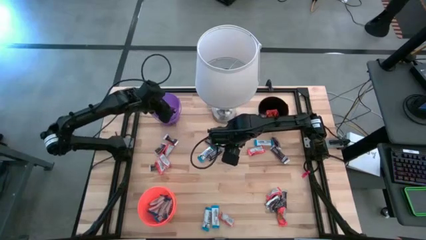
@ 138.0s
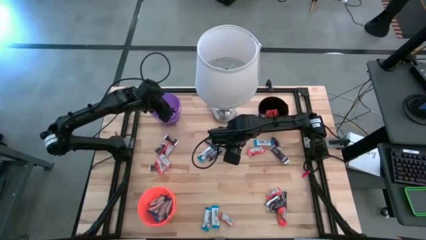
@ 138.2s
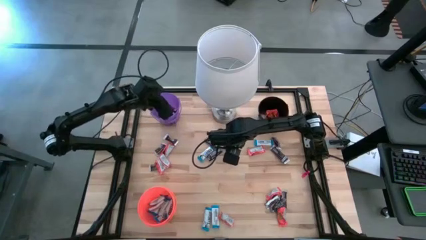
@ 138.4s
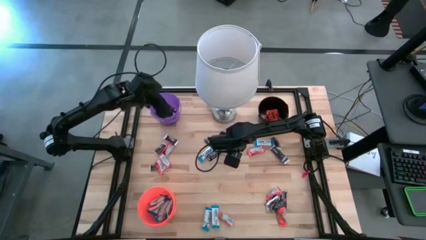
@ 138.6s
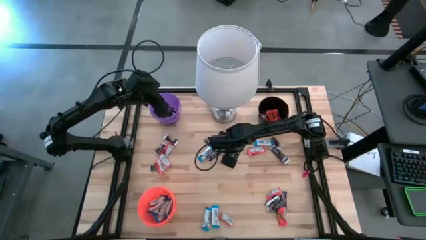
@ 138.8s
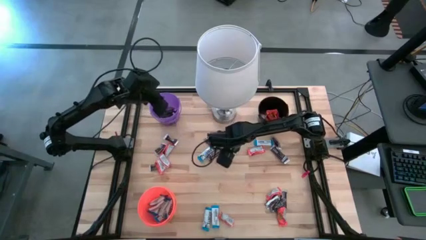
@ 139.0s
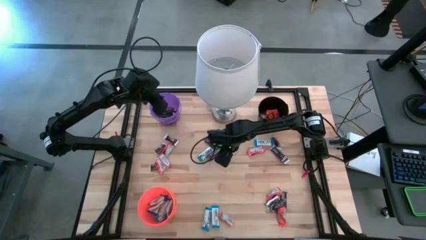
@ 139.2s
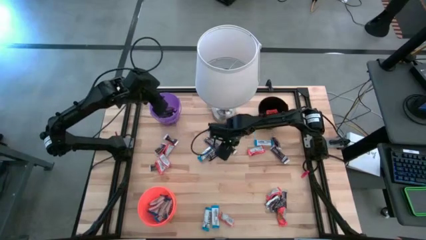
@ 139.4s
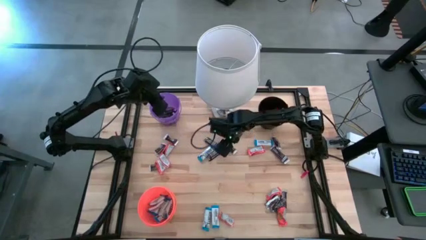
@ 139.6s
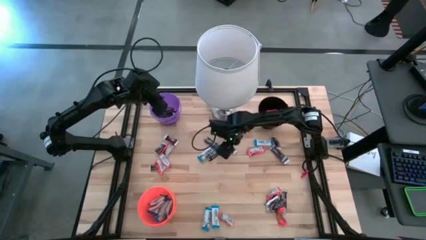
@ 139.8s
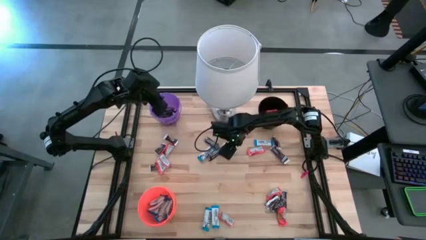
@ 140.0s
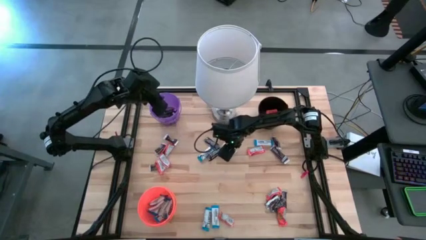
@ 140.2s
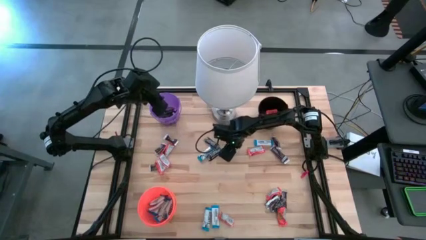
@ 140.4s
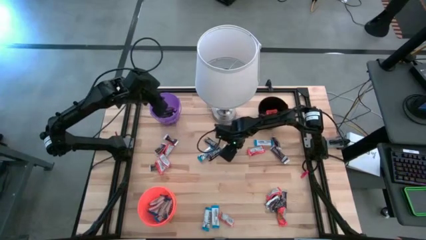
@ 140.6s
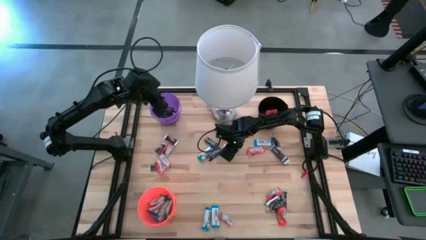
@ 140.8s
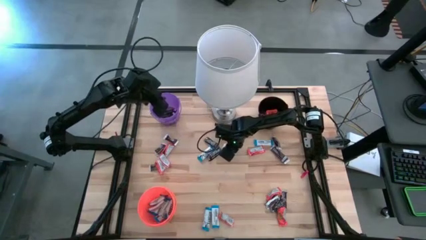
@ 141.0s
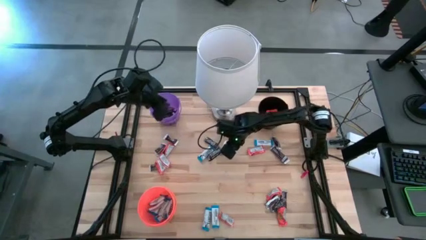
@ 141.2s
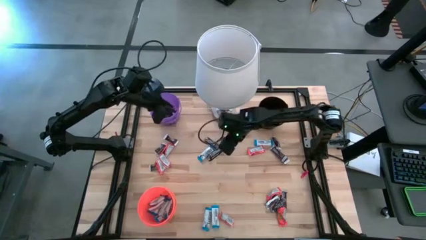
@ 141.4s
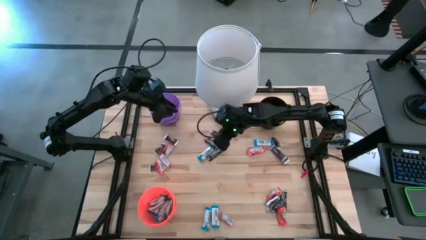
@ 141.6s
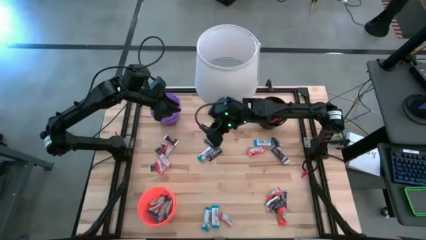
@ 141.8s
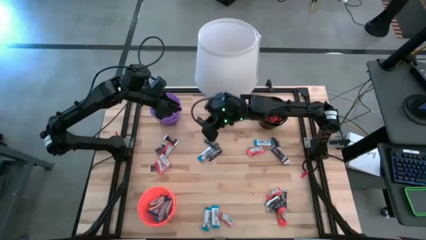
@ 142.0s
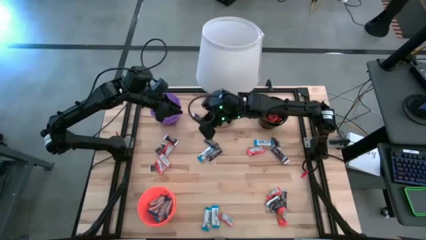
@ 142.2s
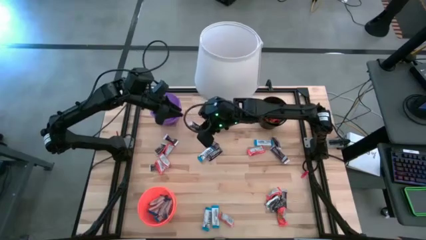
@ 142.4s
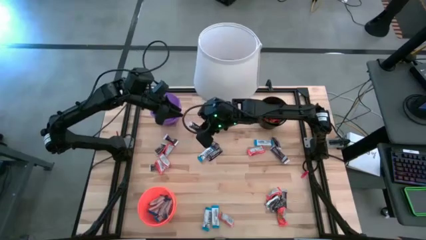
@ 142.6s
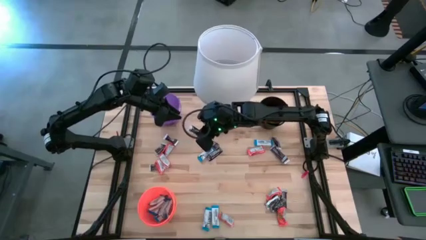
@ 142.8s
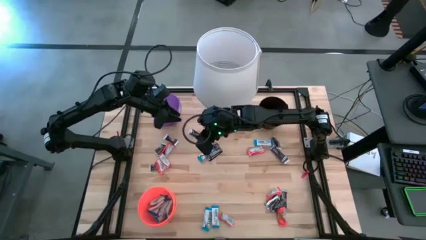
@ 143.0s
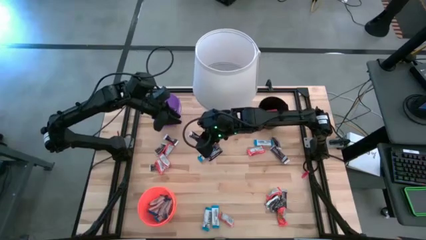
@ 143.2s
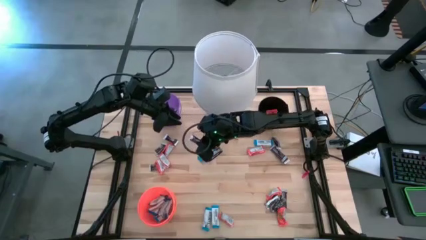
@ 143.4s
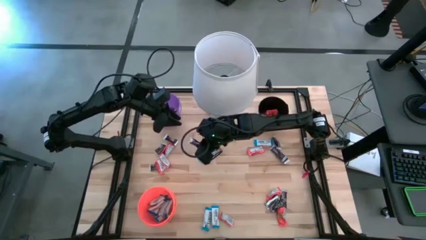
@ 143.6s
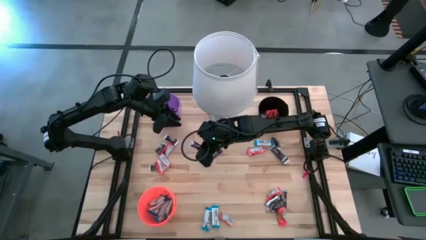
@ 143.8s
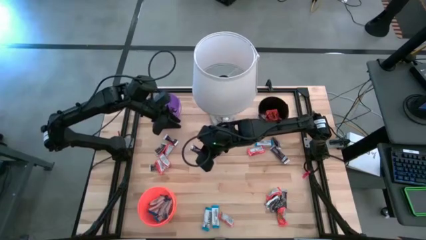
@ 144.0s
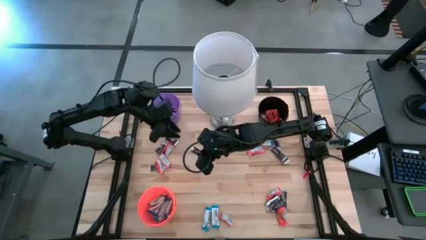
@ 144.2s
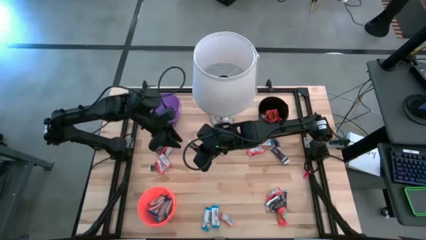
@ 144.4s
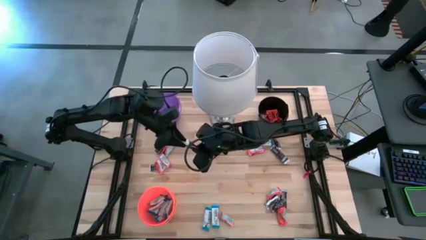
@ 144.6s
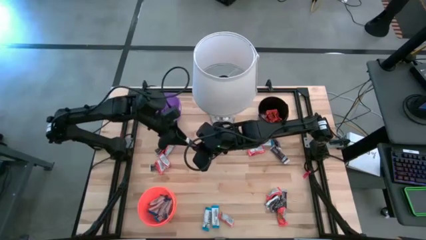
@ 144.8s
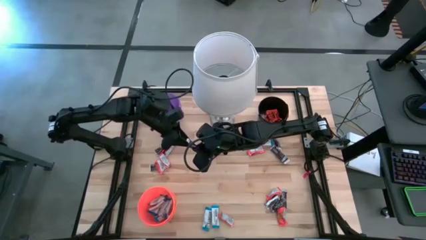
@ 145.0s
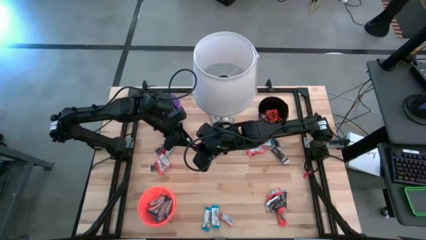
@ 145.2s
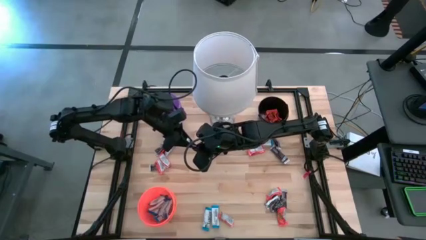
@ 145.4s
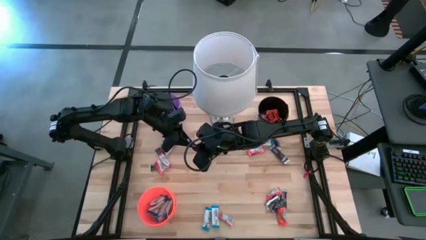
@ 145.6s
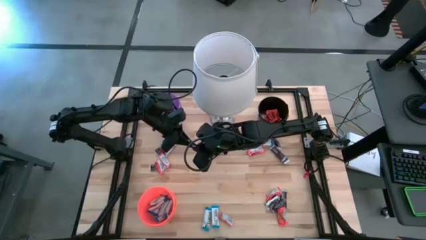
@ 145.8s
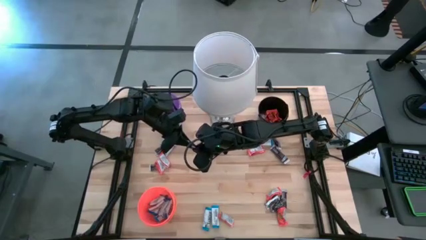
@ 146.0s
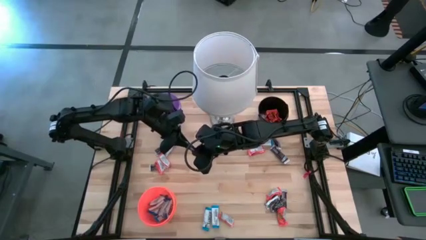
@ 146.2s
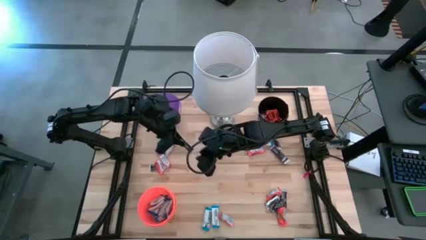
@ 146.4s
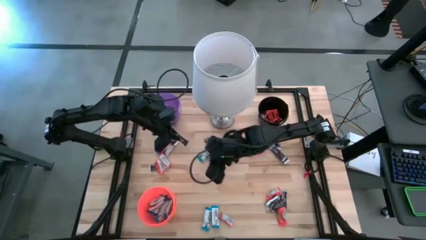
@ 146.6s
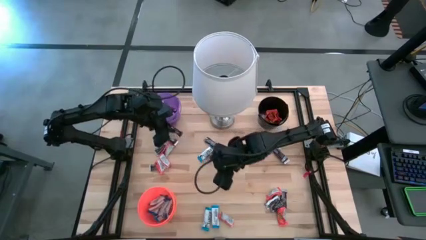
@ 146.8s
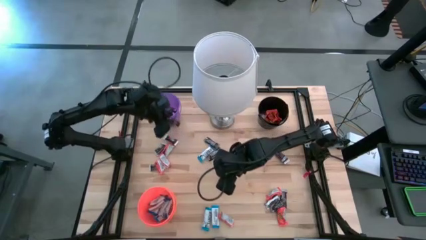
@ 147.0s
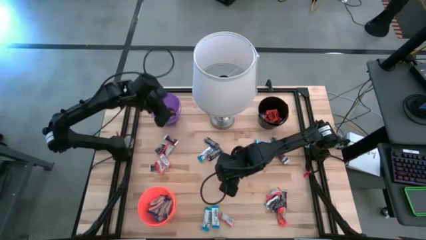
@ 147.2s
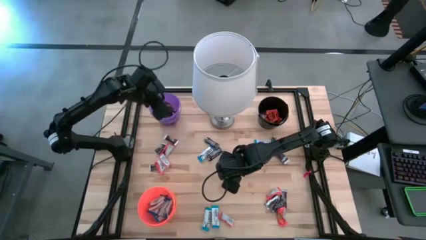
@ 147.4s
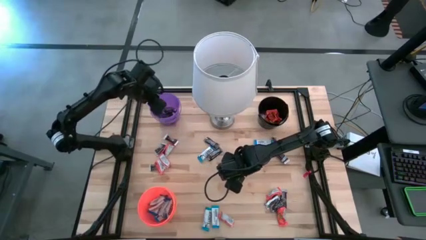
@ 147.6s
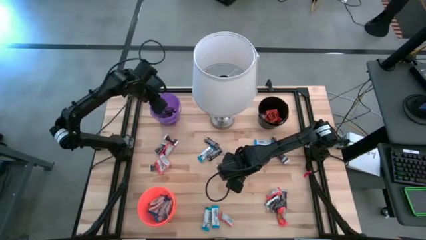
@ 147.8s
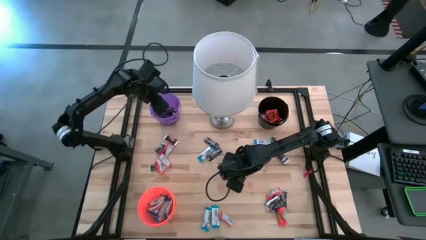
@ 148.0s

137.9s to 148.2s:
Task: Organize candy in baskets
Put the brown chocolate bar into the purple bucket

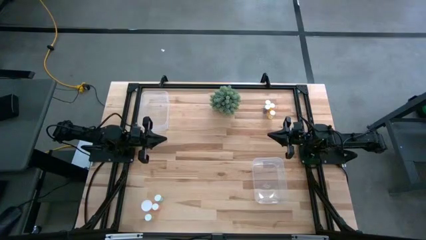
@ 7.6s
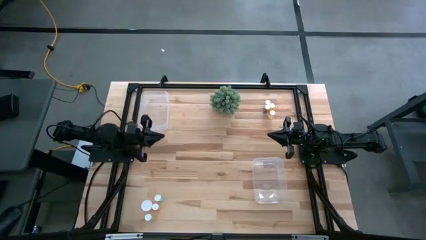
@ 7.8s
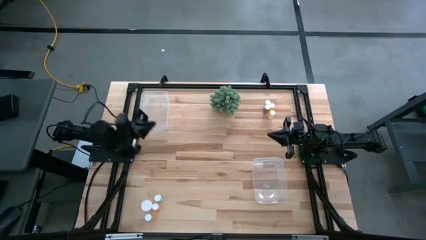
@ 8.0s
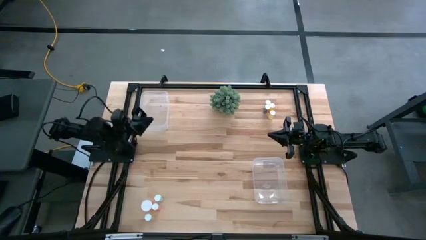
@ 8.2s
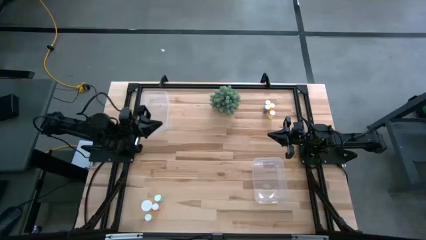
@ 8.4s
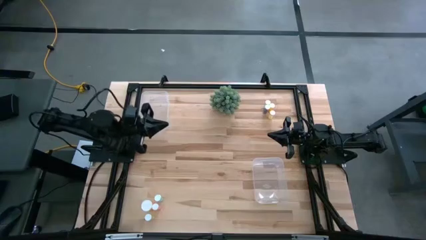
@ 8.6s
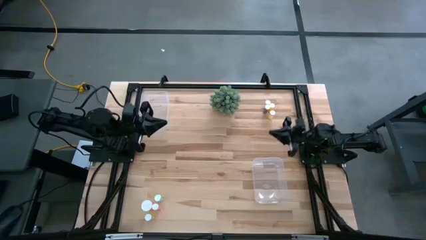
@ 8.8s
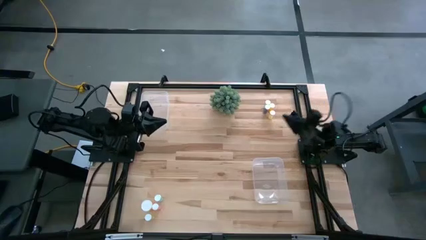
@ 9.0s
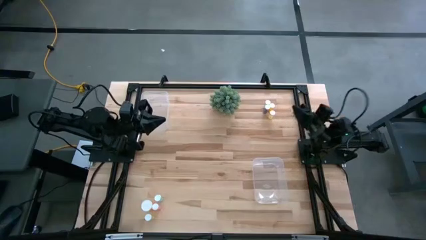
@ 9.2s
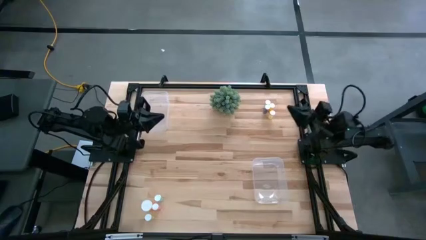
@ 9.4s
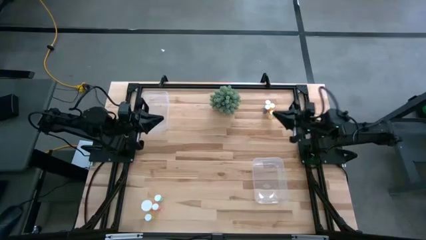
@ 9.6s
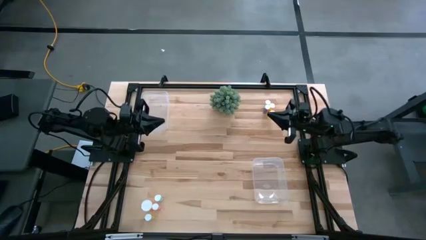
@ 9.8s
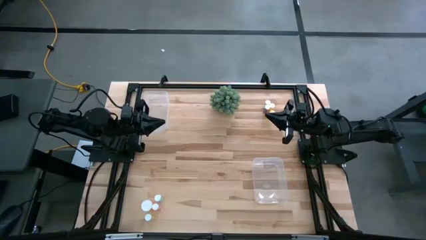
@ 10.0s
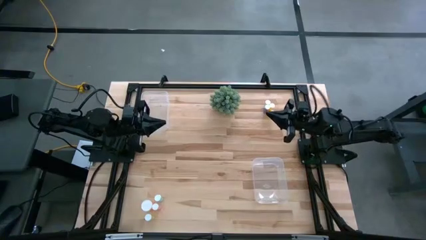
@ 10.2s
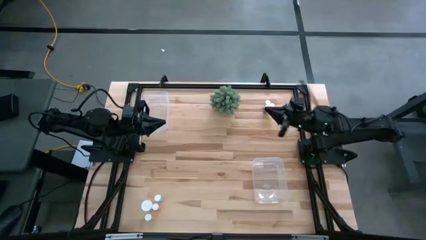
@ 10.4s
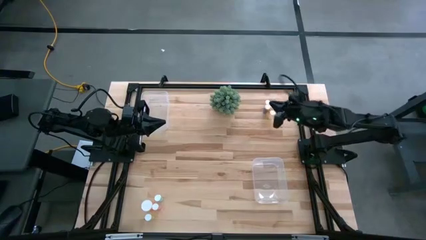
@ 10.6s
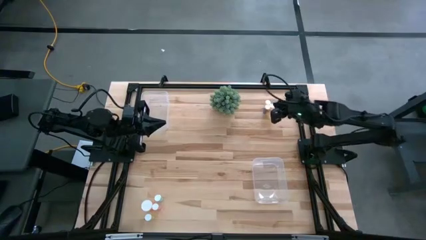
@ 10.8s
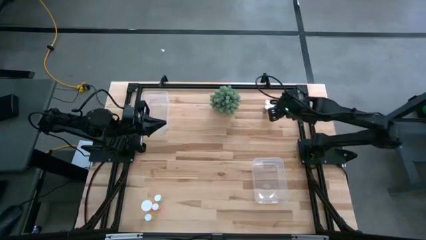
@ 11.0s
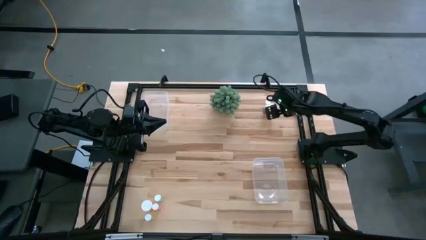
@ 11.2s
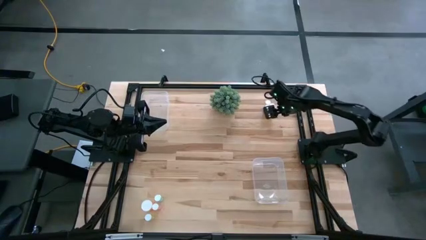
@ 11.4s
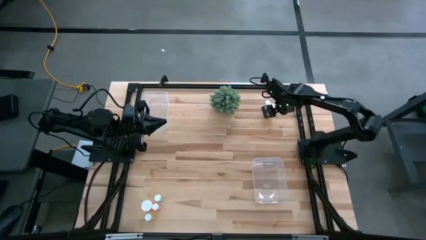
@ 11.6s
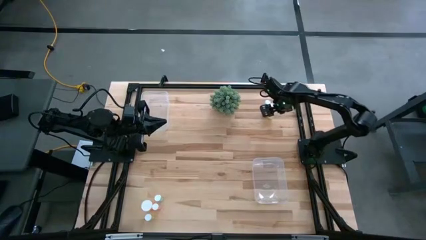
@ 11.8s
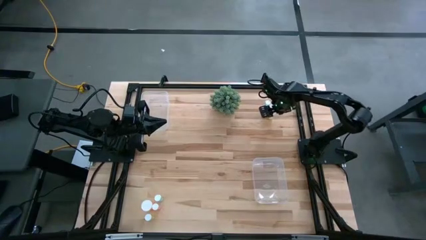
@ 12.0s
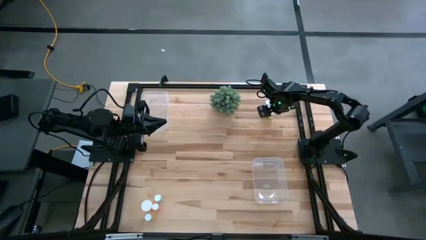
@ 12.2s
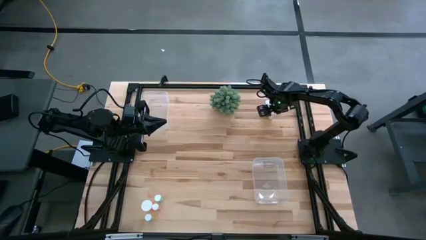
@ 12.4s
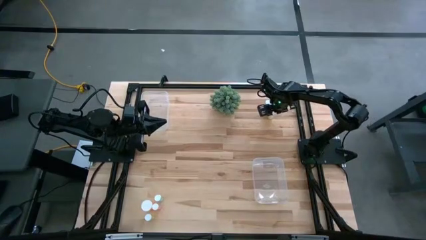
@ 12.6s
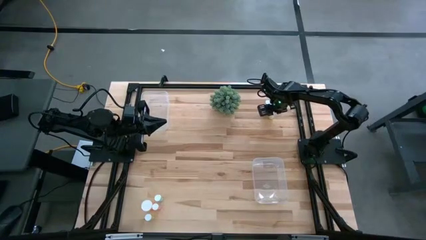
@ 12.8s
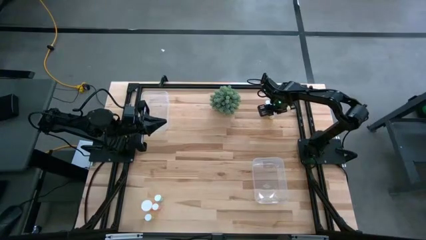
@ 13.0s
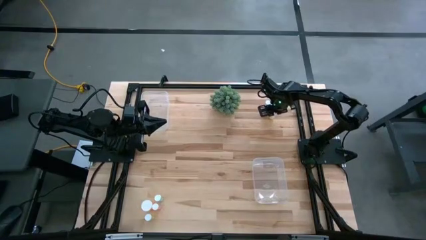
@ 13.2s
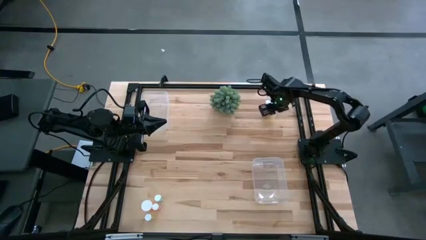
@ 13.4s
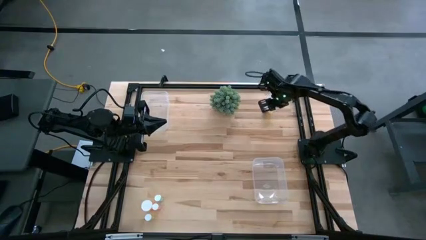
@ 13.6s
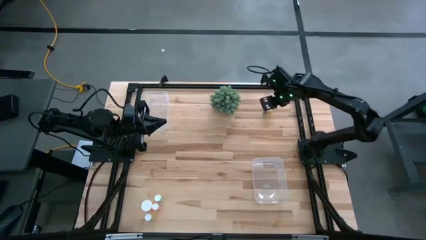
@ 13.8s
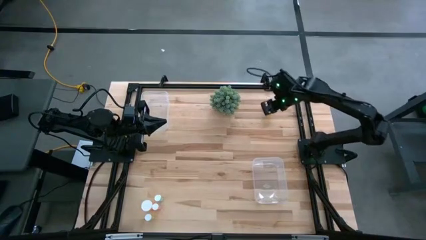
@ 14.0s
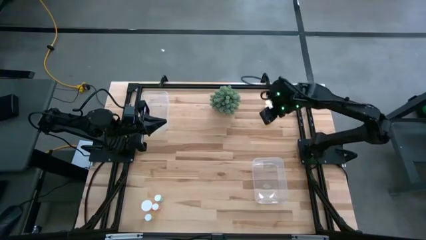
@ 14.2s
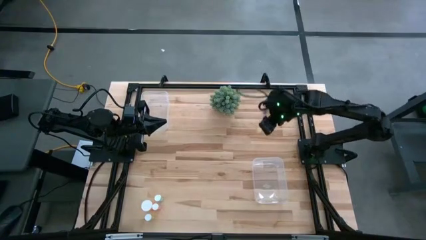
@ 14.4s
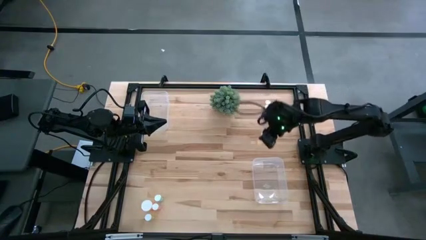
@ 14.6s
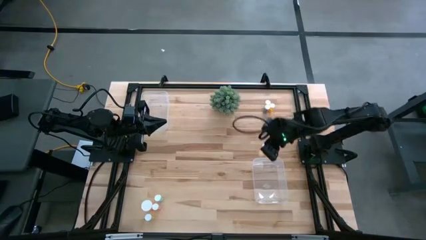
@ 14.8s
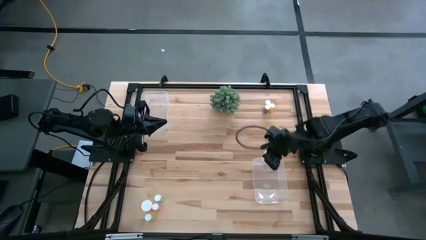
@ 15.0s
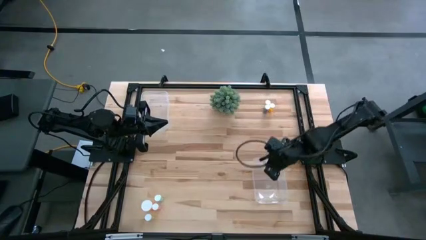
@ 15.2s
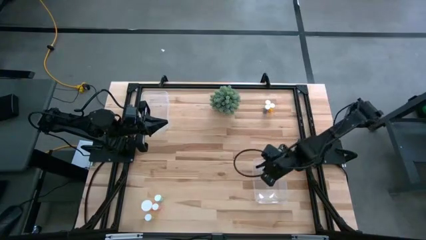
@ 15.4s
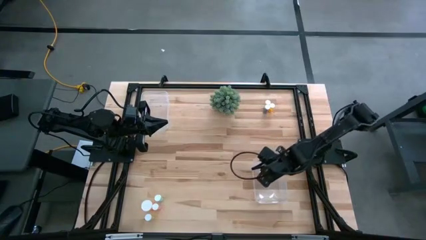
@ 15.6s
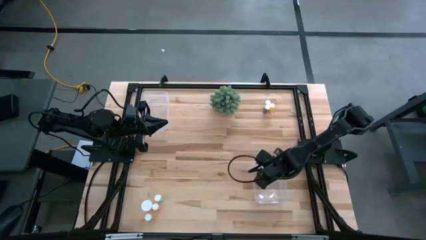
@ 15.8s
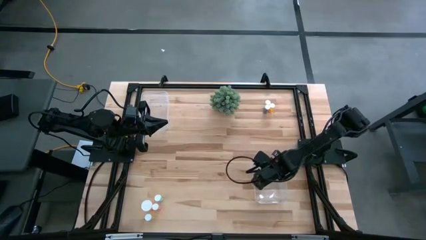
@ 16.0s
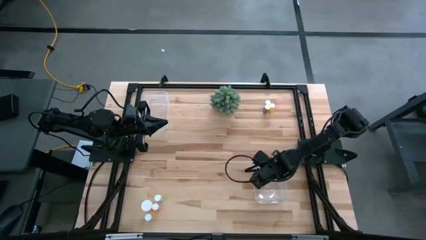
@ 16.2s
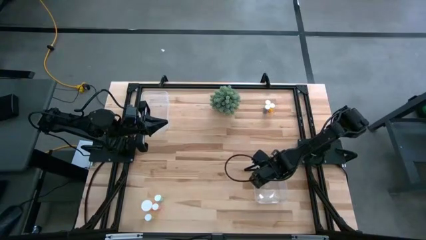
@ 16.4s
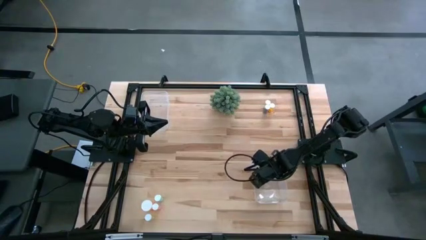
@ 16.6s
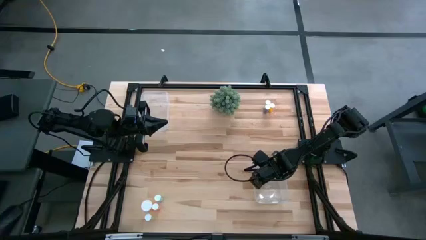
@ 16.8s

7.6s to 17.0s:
Task: Pick and place medicine bottles into bin by pill shape (circle, oval)
Put the right yellow tablet bottle into the right transparent bin
